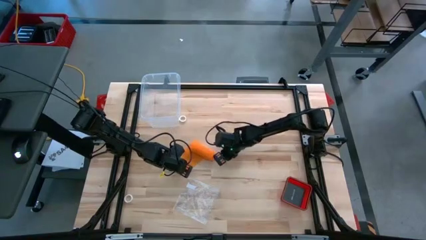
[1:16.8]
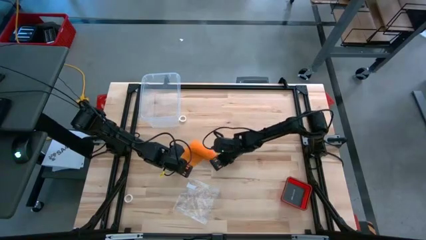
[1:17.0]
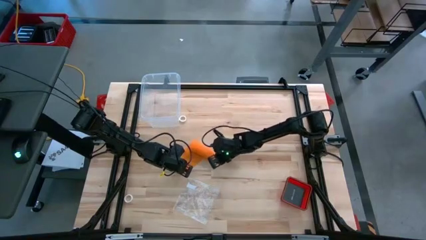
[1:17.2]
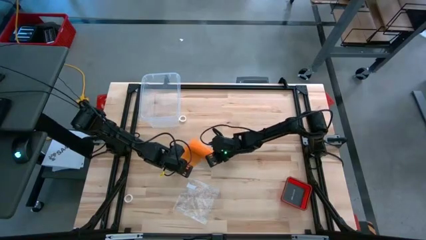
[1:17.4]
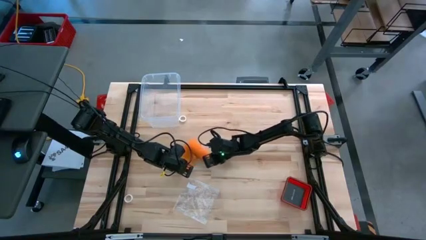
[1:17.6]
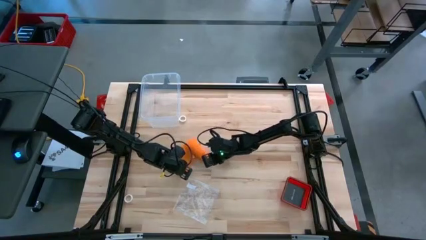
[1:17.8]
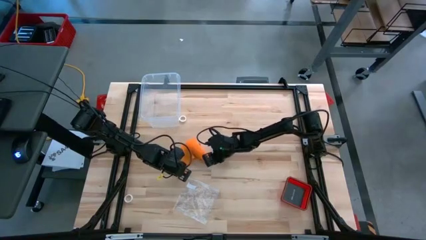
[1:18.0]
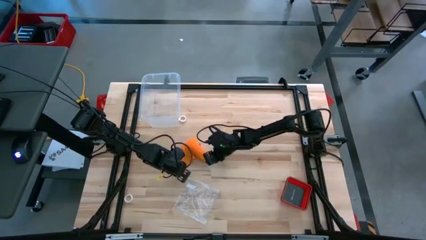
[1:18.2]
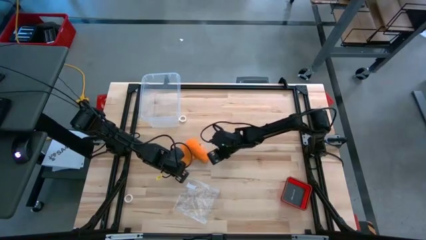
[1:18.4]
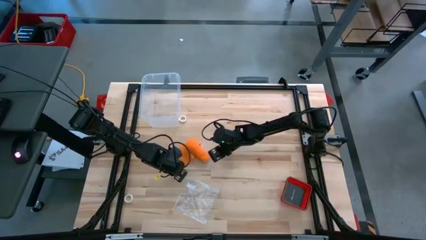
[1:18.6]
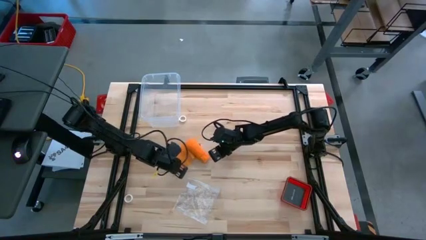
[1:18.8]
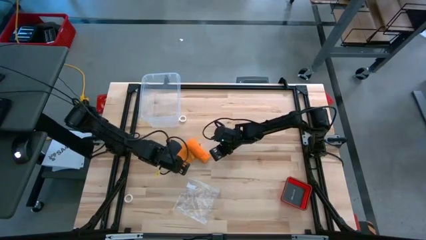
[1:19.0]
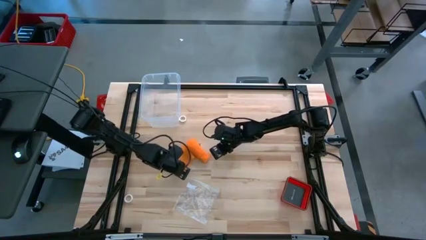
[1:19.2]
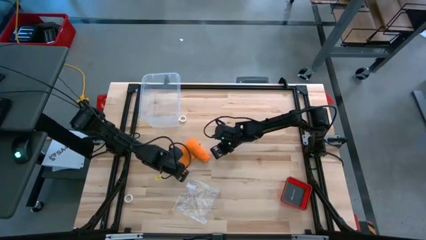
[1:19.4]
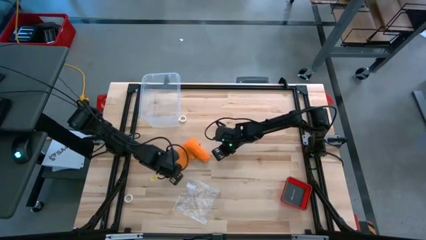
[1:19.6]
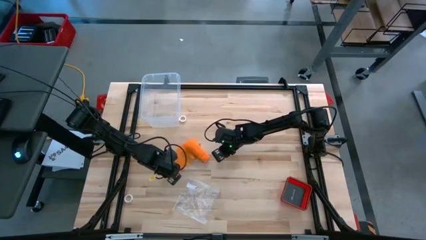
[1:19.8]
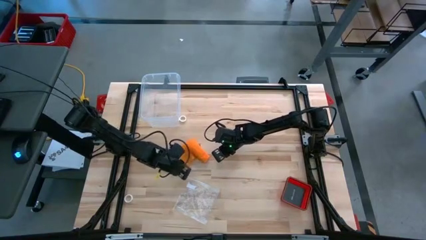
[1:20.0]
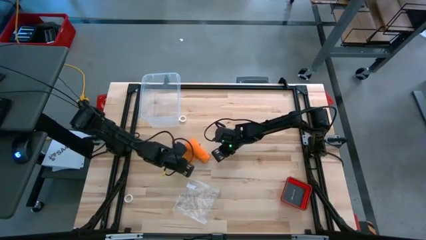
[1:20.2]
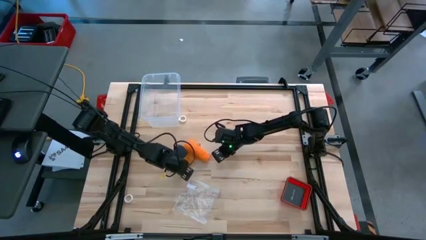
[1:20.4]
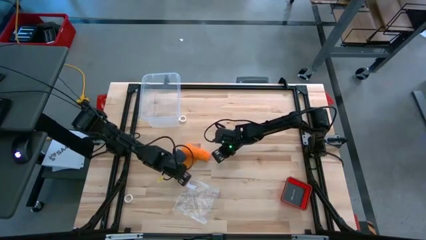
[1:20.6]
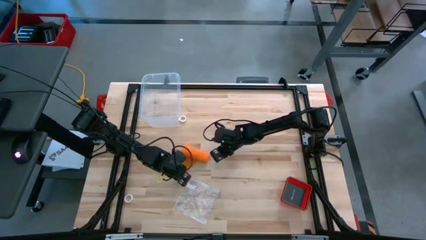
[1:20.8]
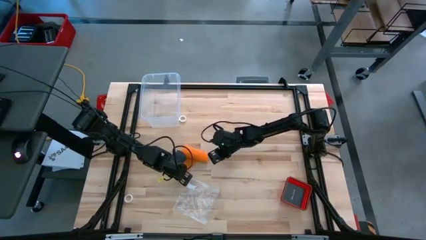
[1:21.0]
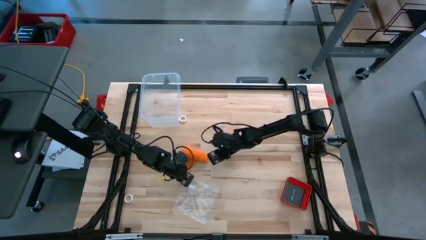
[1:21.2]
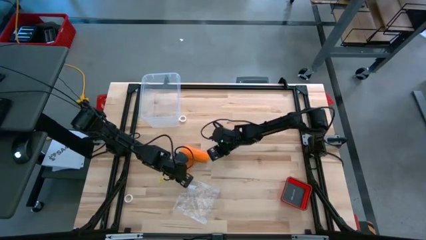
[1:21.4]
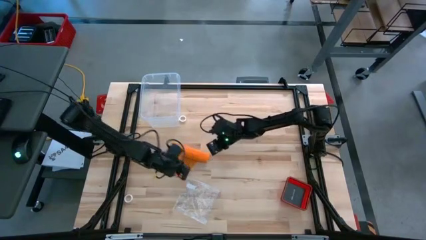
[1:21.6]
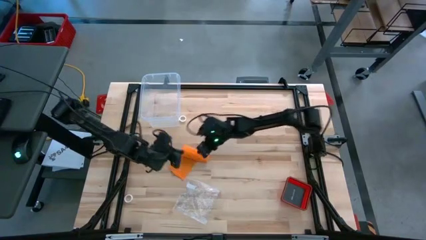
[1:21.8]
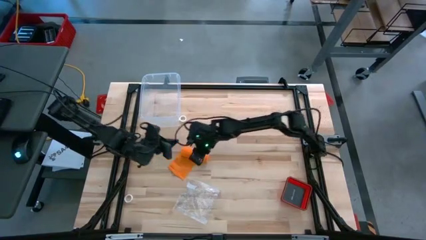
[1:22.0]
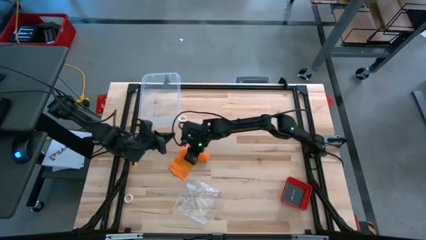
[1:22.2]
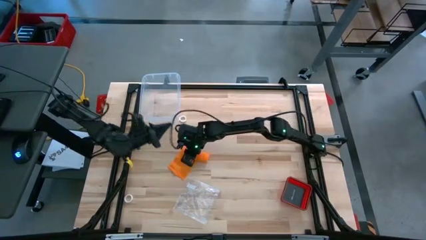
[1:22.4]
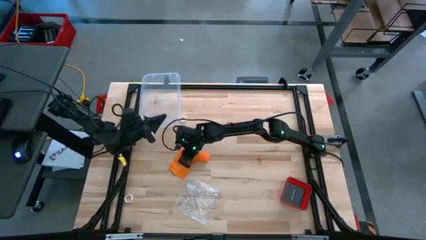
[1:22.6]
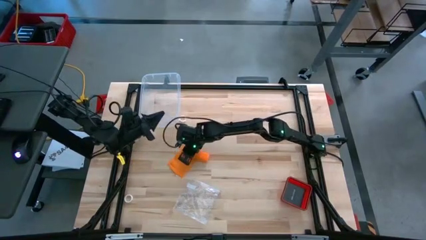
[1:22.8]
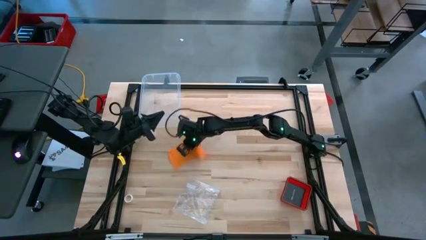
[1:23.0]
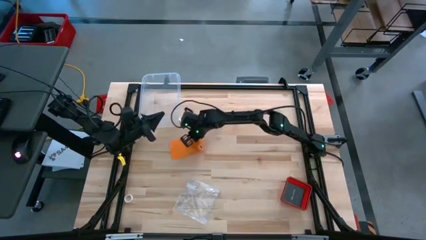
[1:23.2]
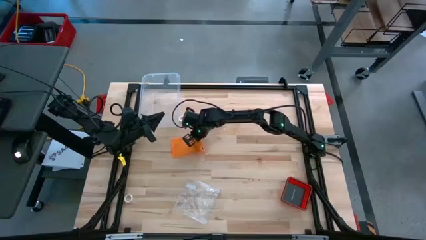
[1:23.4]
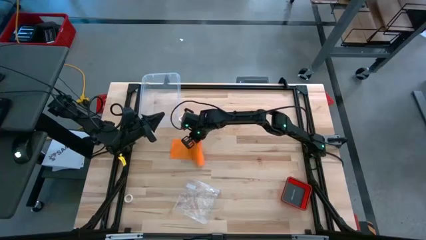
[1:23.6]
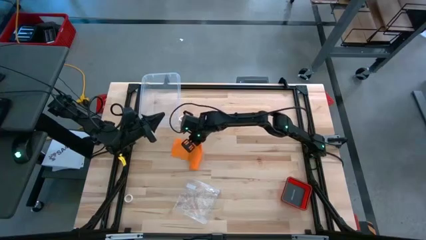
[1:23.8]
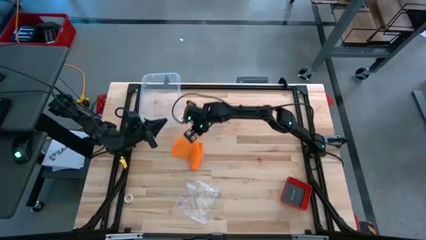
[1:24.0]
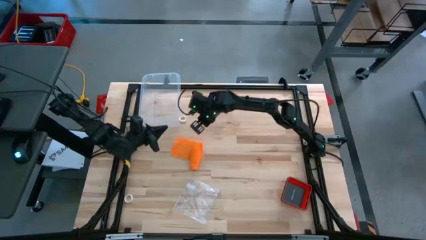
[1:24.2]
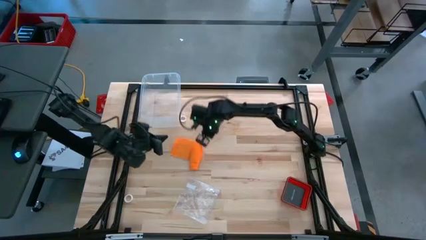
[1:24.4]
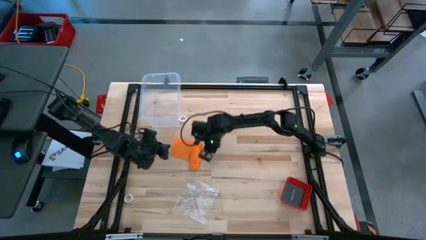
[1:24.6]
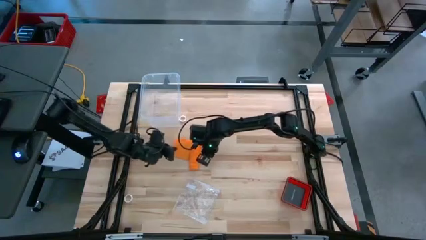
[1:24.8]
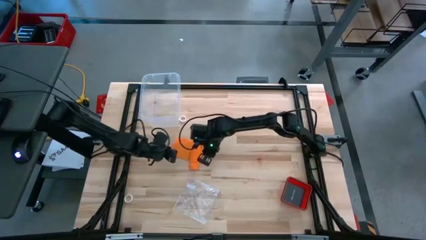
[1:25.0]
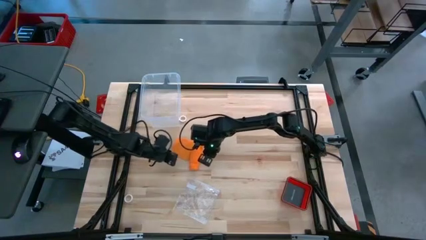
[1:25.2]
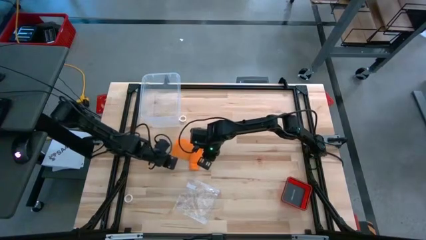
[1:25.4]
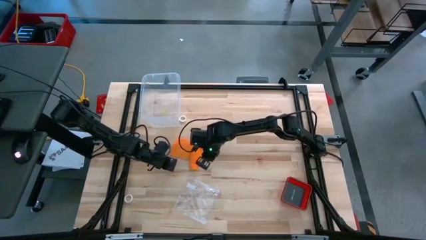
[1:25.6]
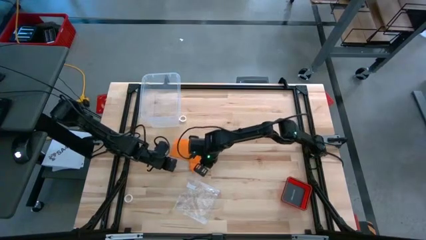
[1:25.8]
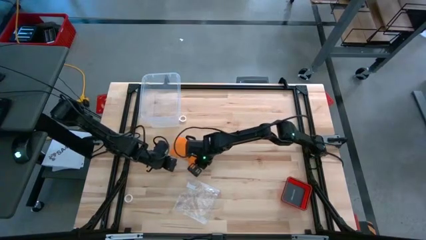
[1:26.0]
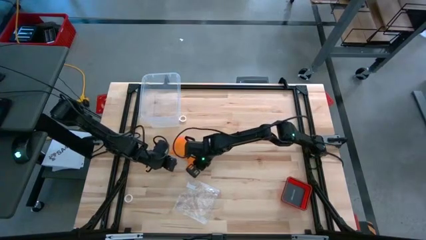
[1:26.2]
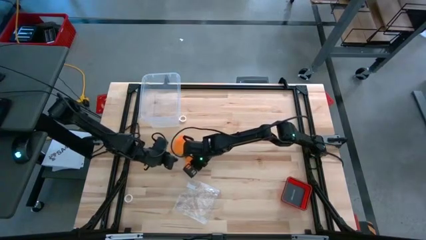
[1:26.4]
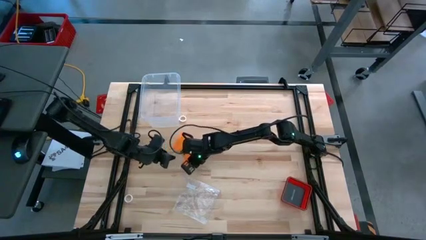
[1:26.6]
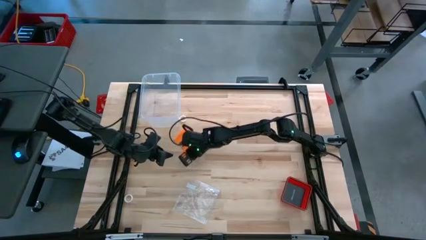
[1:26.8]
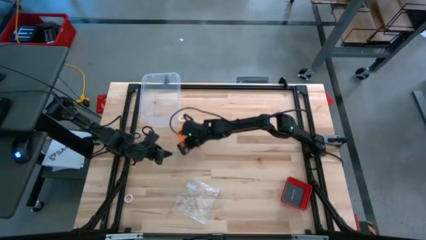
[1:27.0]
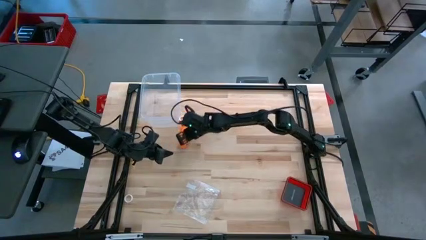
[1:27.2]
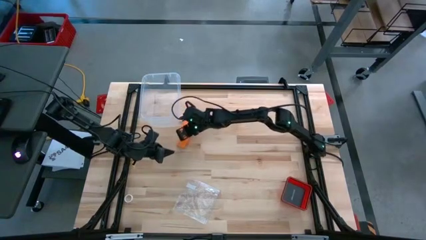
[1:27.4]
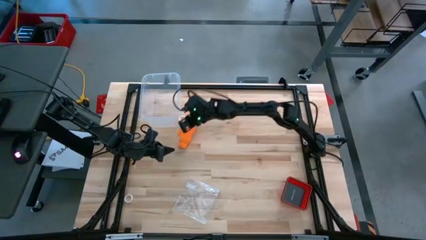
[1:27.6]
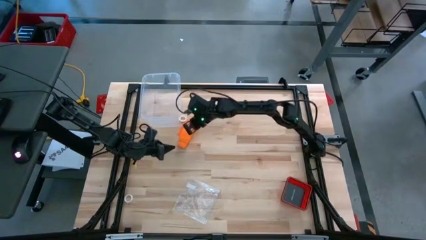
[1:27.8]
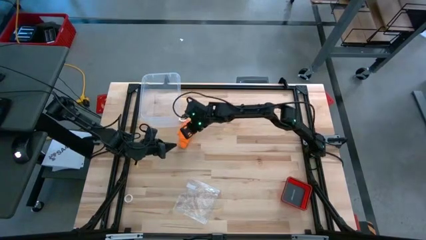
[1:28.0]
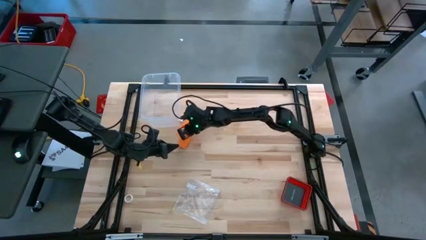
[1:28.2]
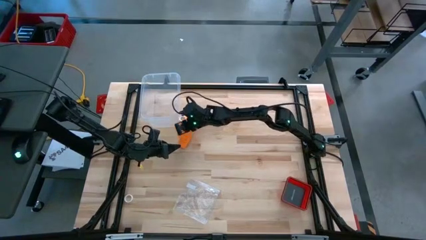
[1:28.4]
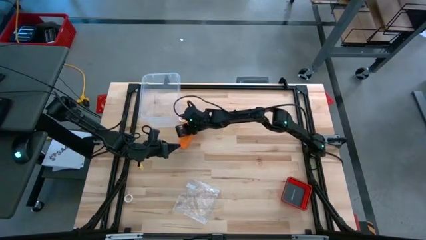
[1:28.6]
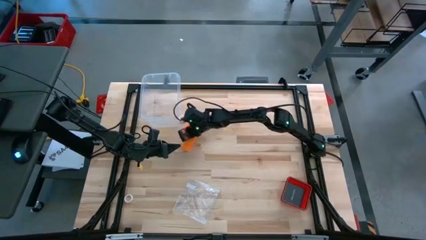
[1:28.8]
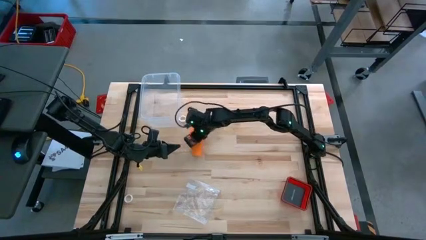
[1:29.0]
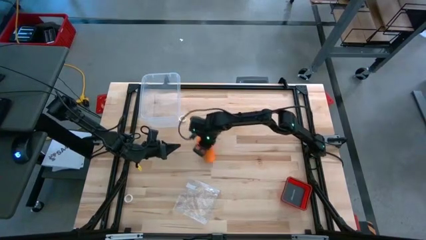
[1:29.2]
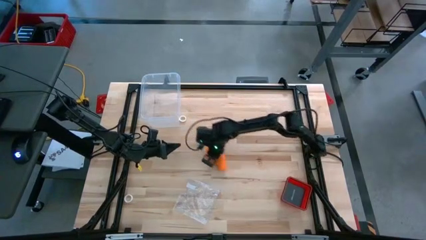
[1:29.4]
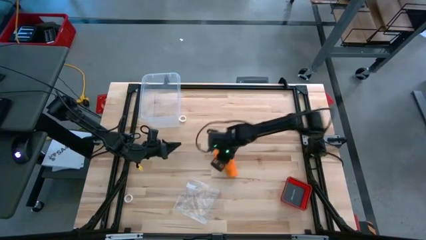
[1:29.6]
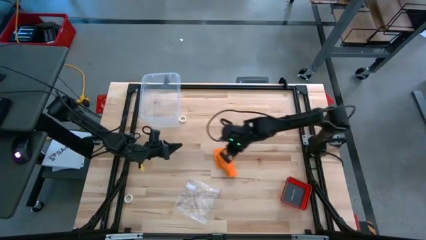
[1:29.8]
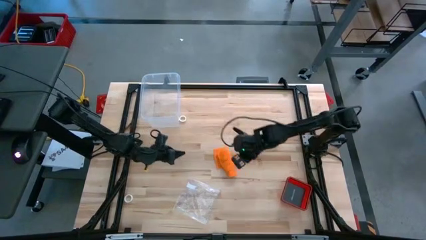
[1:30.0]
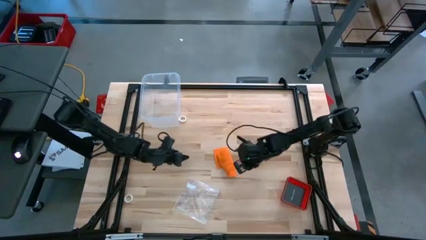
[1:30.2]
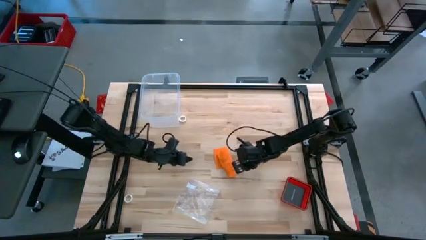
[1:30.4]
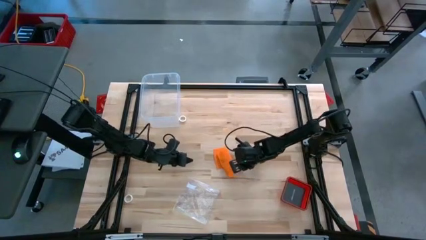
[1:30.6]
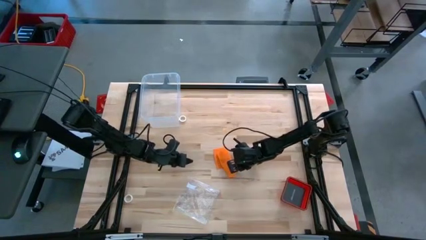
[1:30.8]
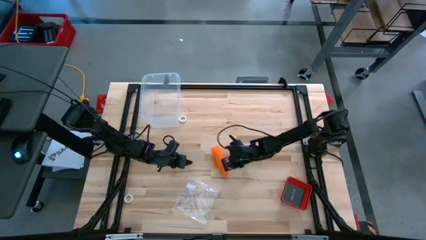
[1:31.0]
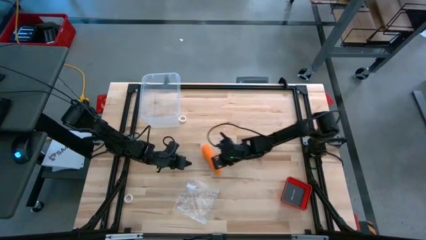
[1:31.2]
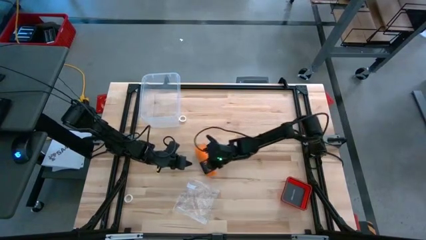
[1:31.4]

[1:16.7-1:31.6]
Task: Roll bandage
Roll the orange bandage
